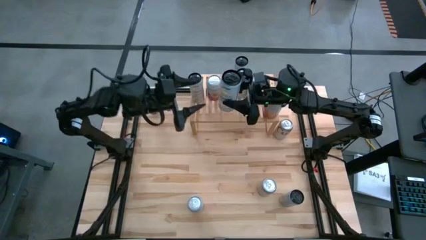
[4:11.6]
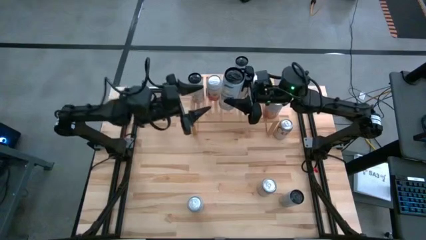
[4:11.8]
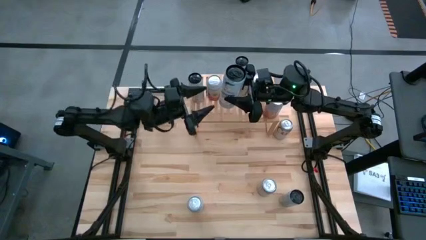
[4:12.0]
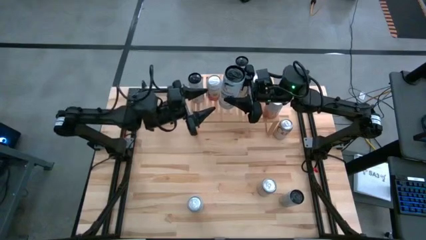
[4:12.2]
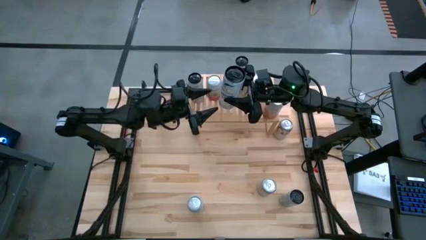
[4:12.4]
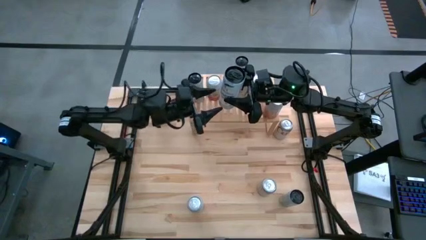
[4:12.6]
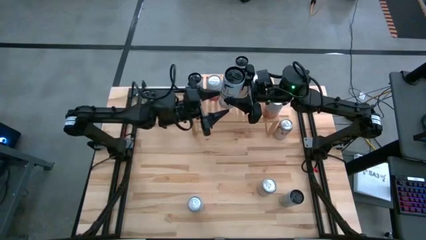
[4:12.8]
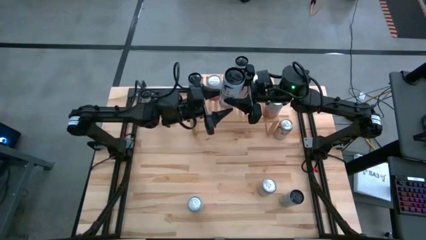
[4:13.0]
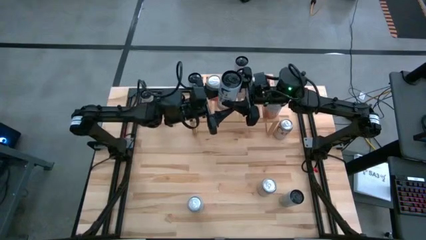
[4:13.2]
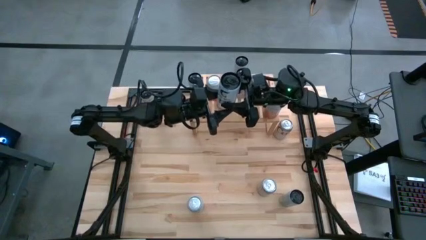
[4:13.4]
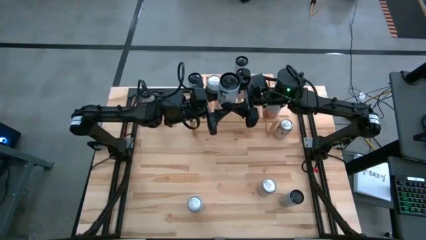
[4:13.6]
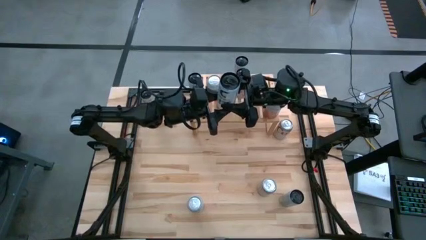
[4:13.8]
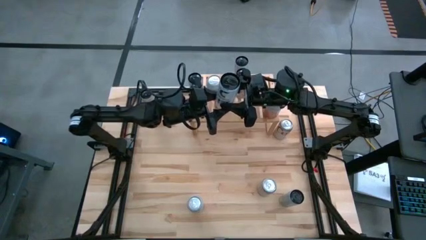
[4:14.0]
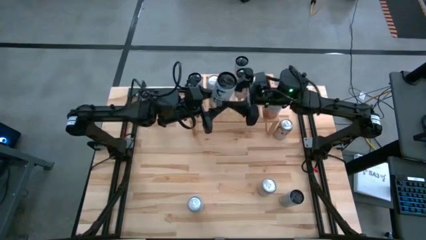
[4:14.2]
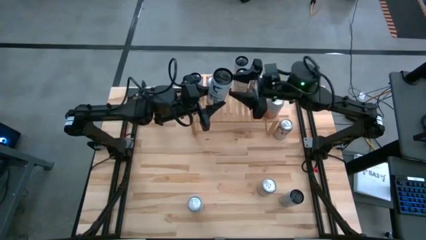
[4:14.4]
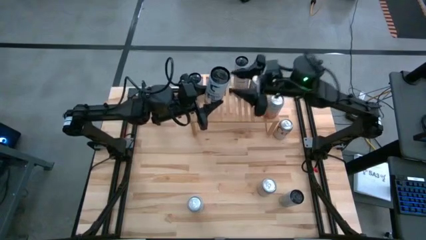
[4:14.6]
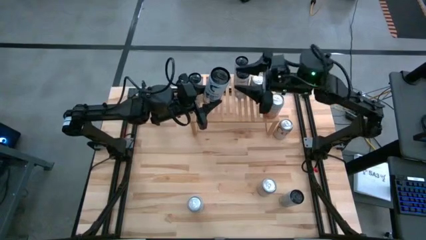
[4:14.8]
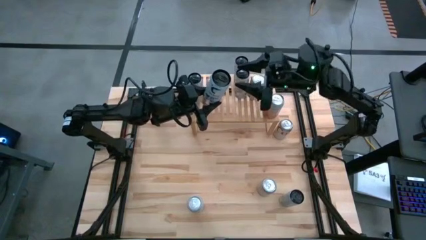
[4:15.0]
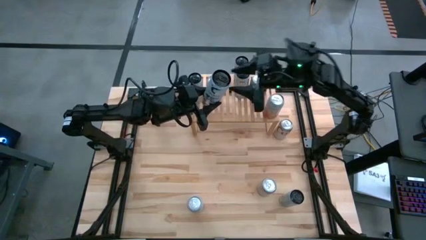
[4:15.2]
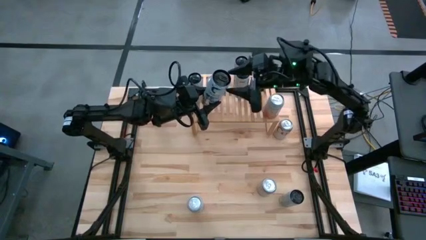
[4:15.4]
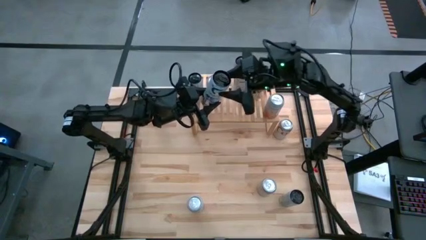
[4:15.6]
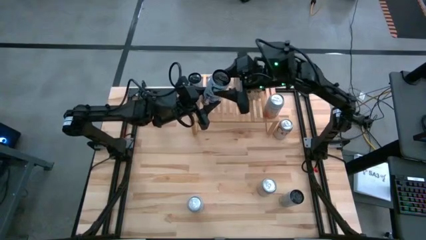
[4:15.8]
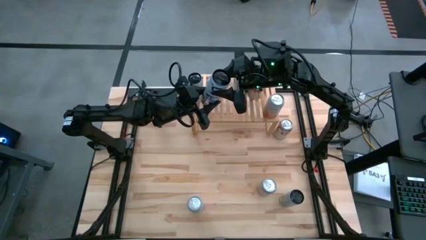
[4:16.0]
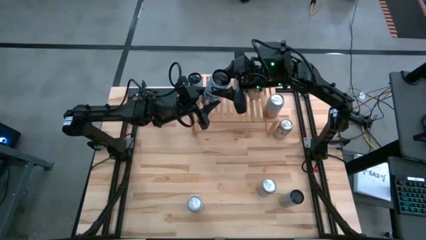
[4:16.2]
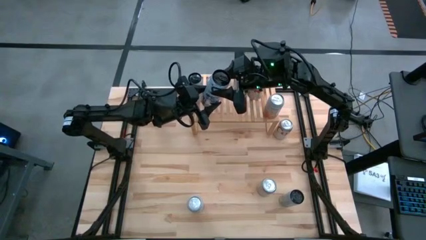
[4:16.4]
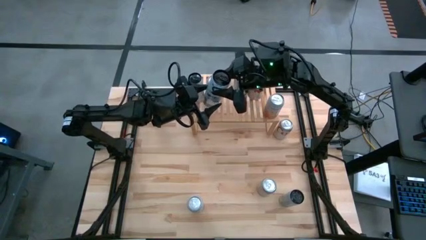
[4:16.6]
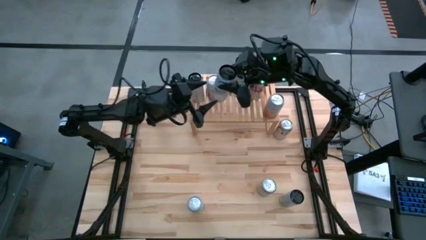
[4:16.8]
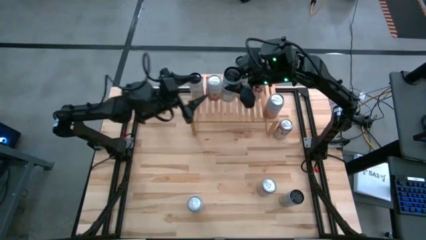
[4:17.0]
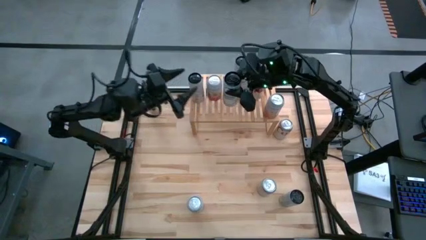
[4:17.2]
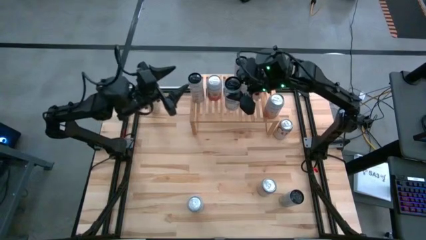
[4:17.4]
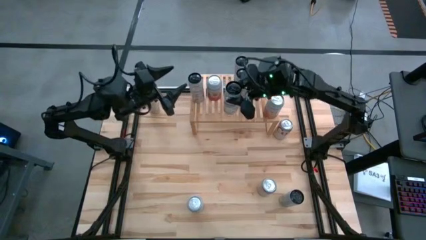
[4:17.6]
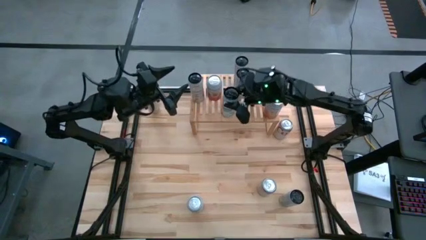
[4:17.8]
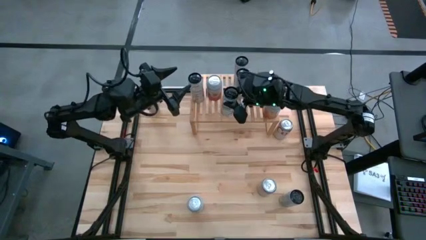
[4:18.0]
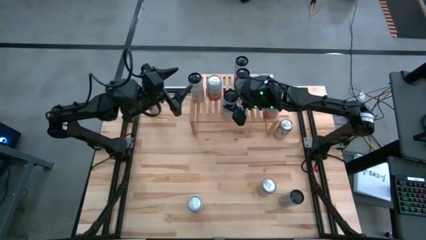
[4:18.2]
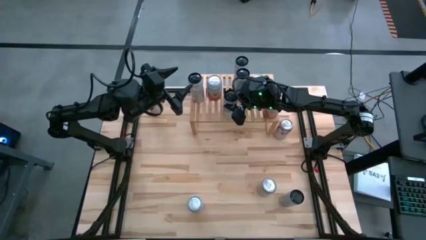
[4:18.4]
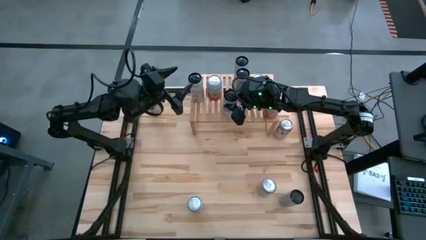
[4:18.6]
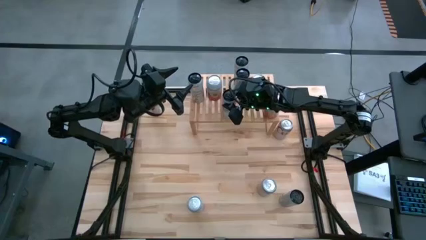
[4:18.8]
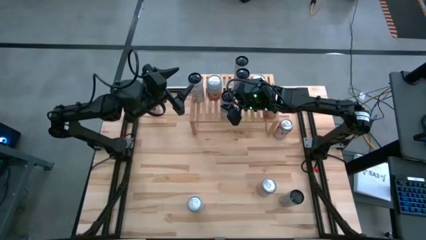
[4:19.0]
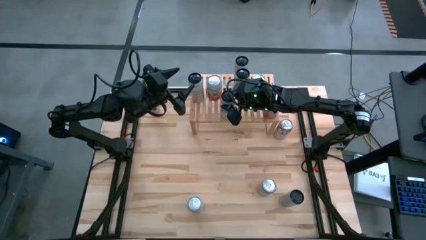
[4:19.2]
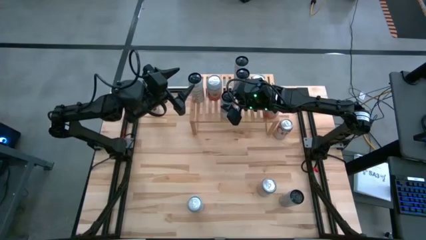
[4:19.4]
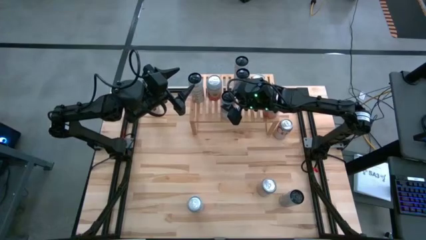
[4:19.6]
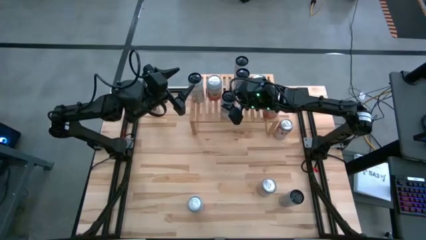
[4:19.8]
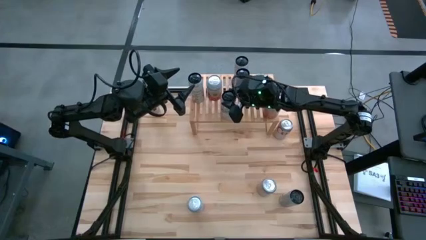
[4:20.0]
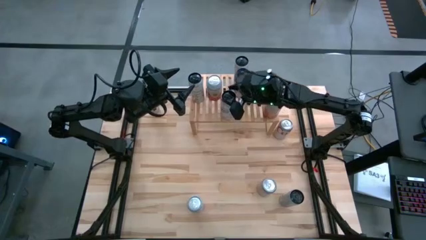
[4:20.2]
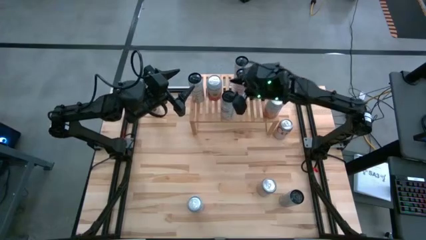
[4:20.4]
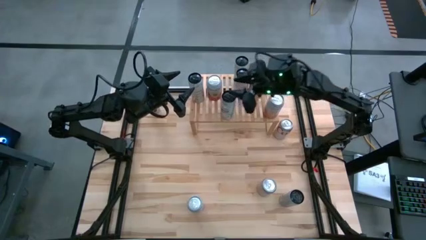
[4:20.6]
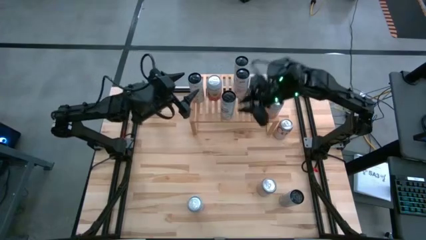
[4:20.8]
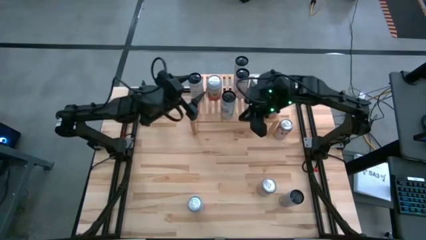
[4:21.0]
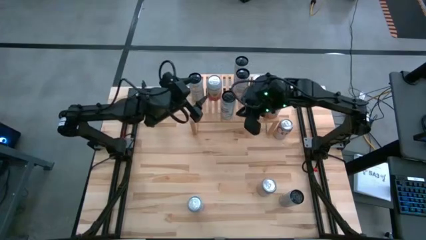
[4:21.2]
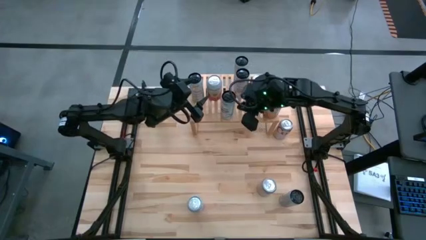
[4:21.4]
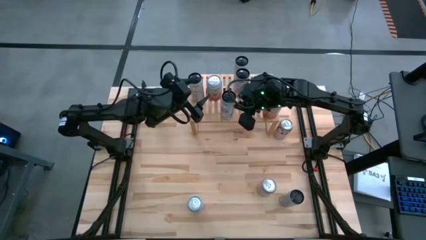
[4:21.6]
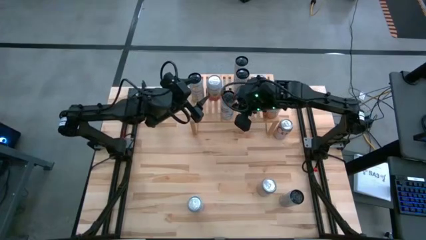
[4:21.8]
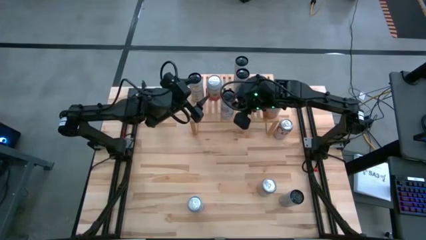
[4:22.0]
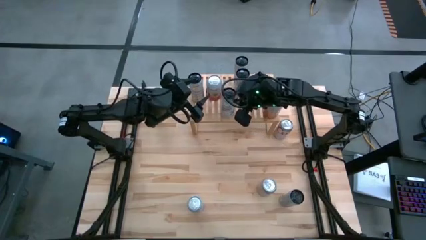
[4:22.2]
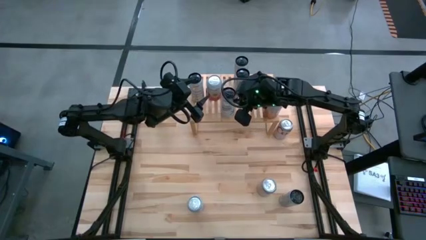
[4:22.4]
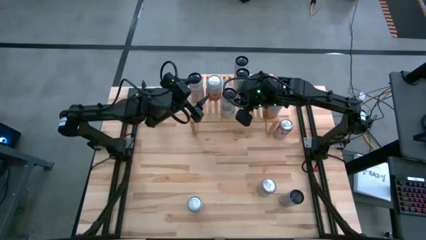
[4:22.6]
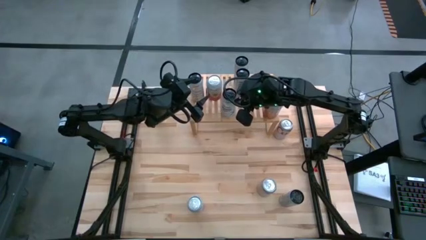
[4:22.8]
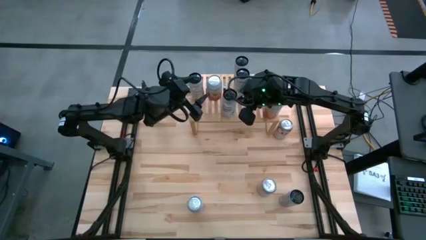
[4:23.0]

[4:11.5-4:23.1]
Task: Place canned beverage on shelf
Put the blue soda can on the shelf

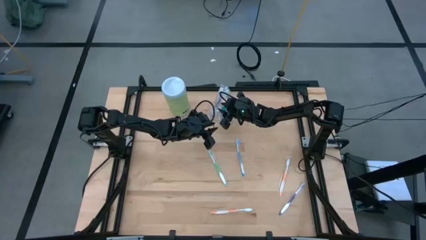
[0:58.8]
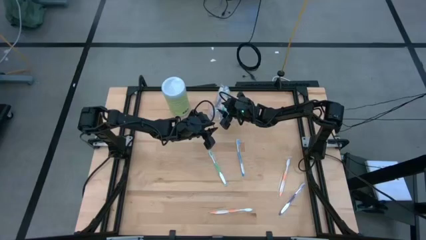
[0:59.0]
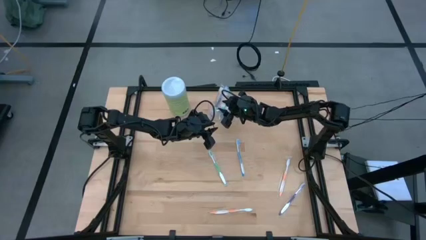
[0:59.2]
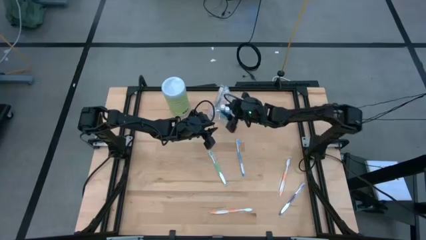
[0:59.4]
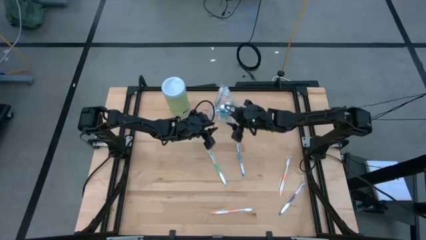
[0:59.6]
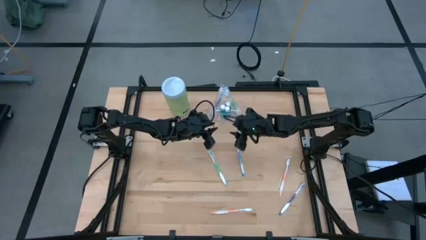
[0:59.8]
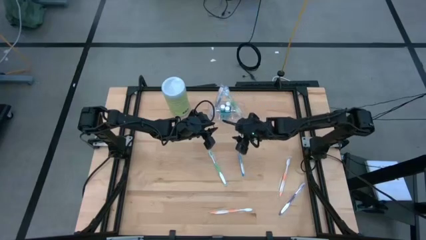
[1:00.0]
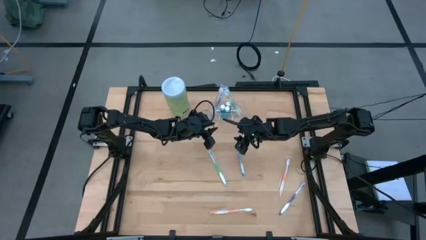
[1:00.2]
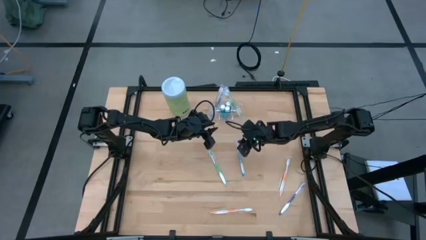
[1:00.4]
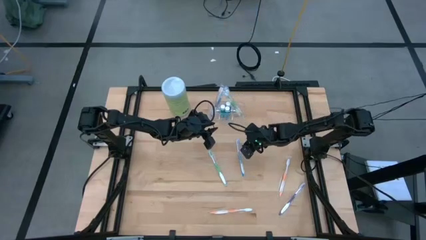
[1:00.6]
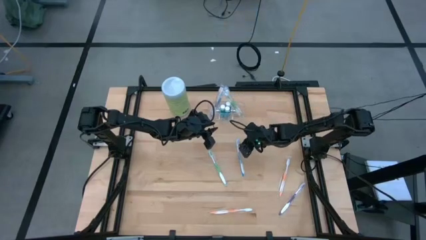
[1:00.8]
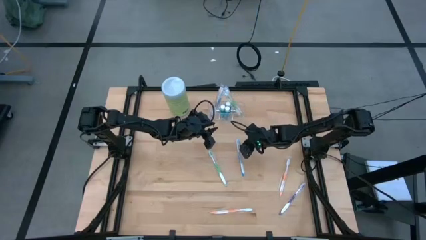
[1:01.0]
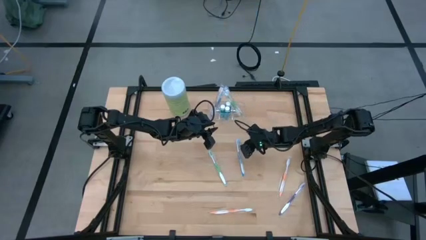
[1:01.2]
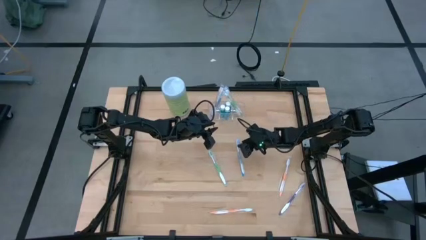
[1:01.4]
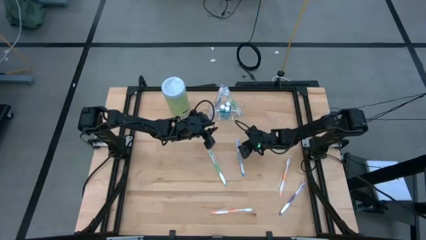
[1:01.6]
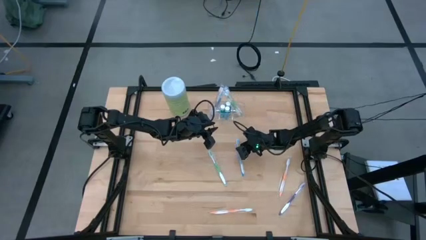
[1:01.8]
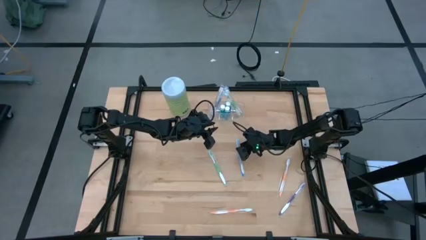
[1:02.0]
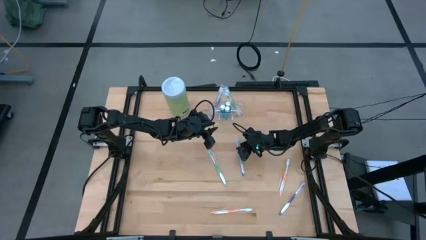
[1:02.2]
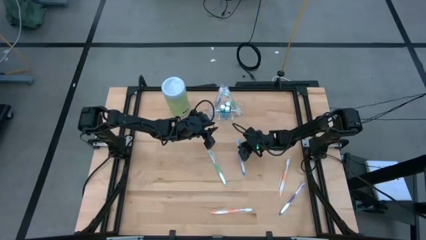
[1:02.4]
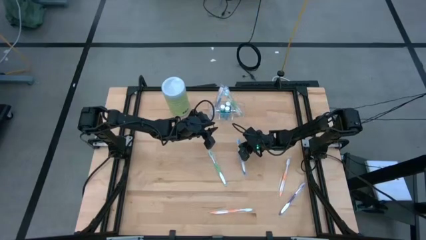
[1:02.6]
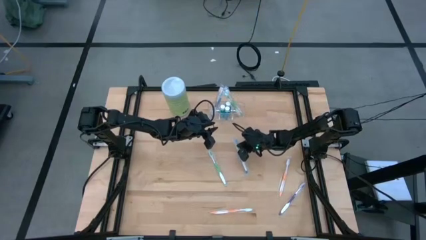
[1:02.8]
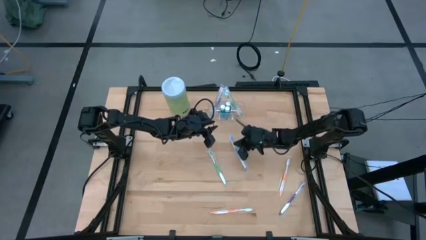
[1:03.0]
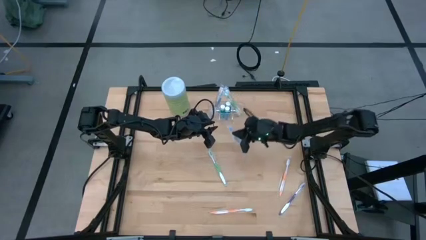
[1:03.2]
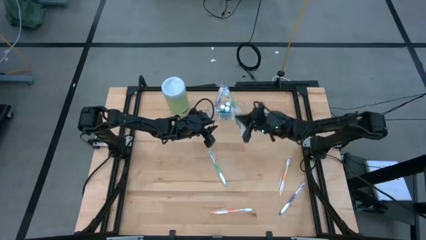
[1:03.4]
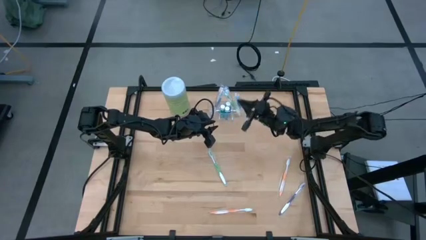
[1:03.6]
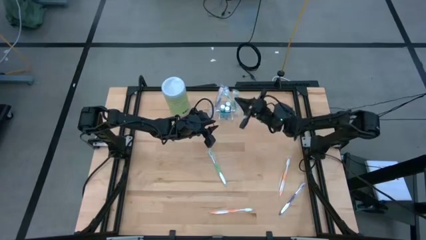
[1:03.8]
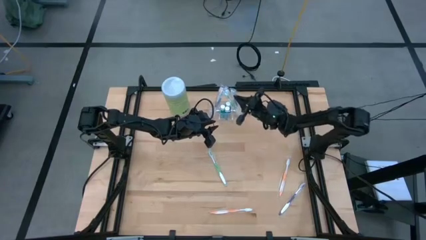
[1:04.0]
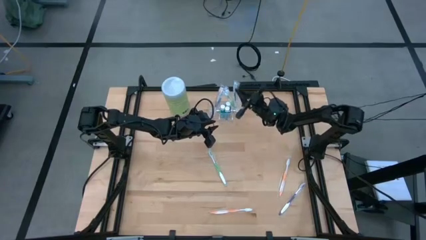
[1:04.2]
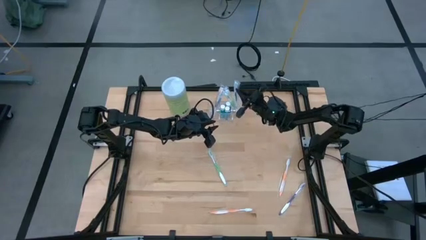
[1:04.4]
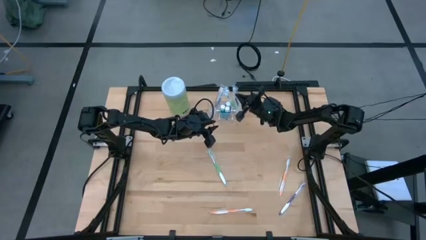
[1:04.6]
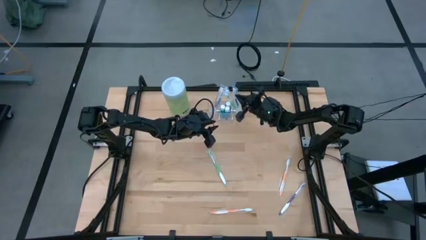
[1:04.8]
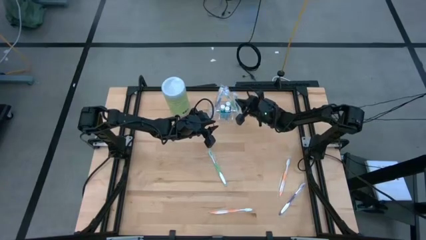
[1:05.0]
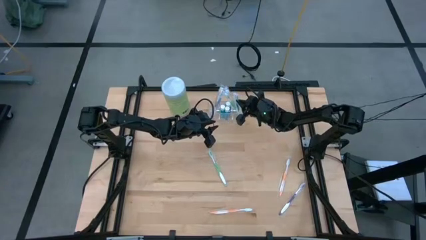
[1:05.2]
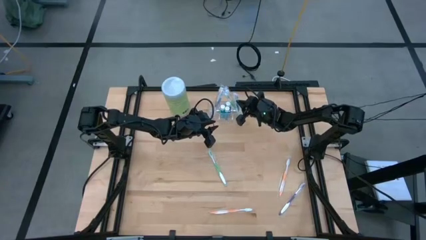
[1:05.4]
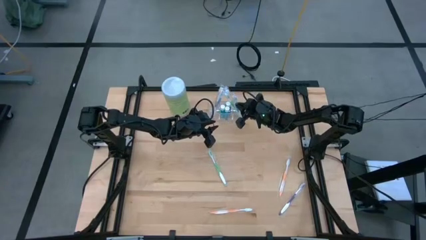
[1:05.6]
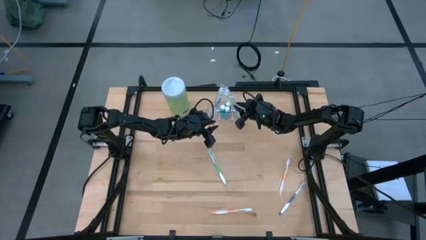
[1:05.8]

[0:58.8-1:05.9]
Task: Pick & Place toothbrushing station
Put the blue toothbrush into the transparent organizer
